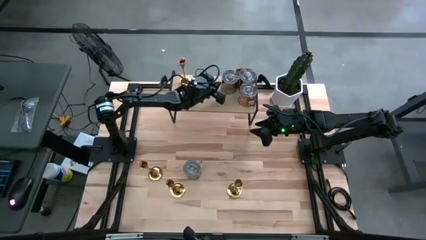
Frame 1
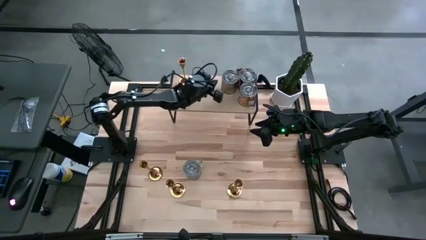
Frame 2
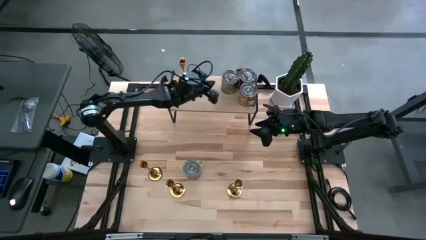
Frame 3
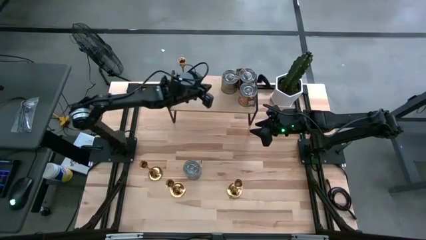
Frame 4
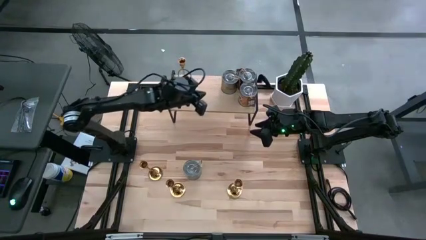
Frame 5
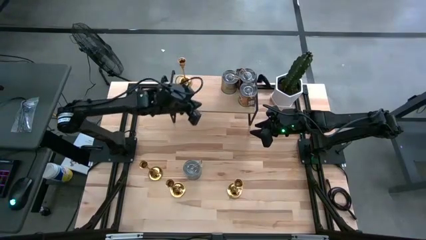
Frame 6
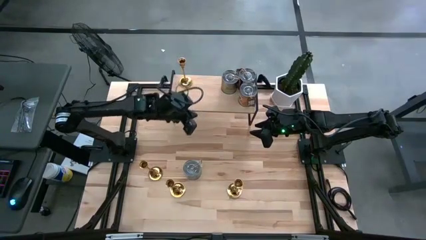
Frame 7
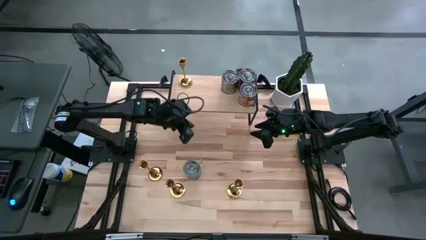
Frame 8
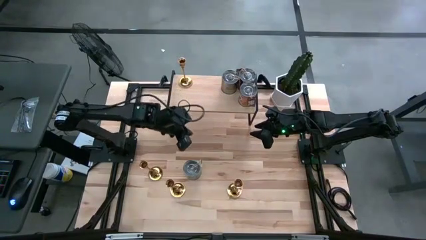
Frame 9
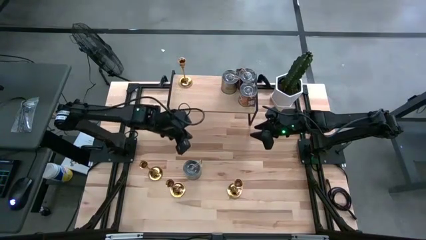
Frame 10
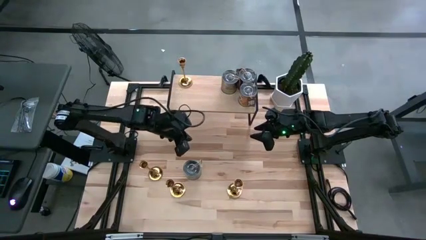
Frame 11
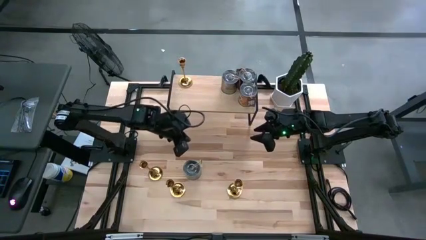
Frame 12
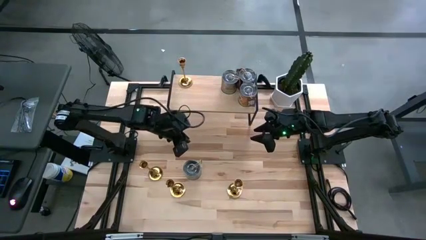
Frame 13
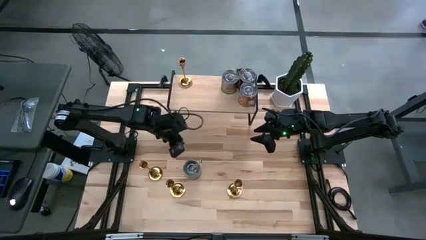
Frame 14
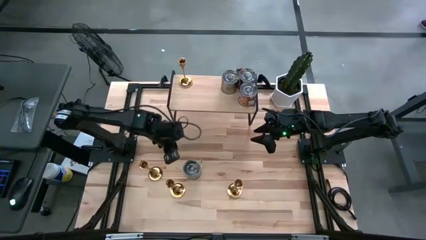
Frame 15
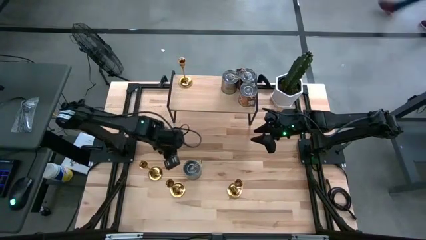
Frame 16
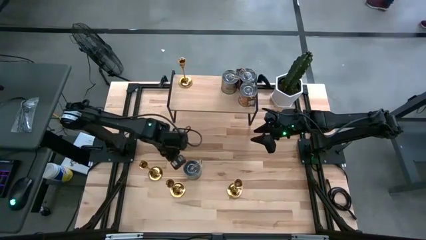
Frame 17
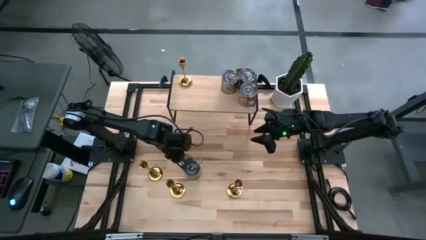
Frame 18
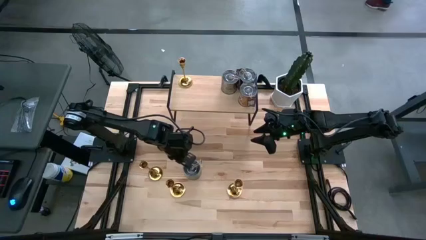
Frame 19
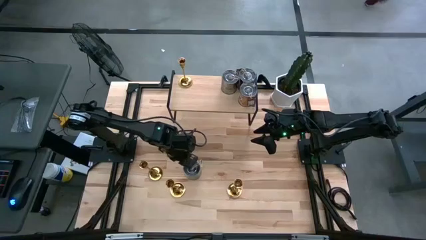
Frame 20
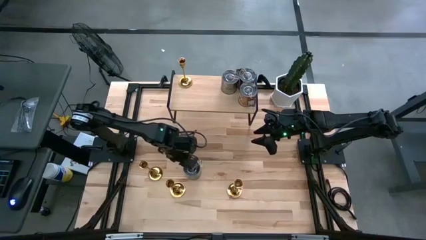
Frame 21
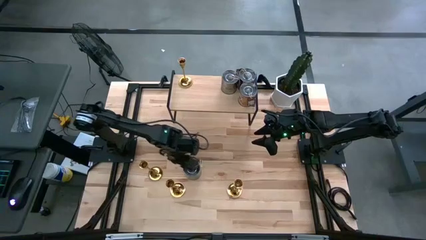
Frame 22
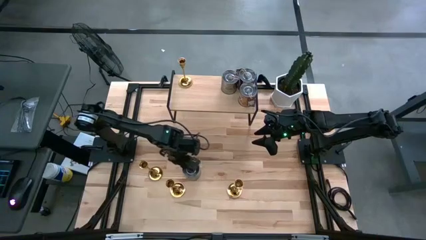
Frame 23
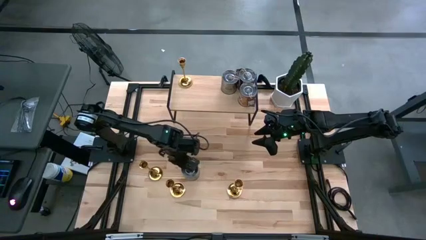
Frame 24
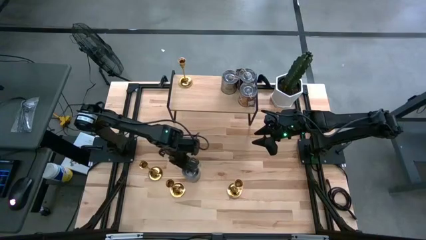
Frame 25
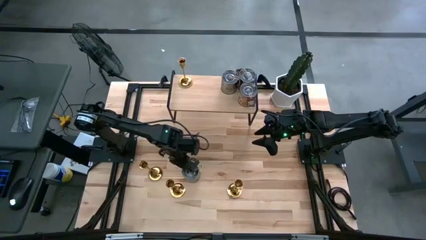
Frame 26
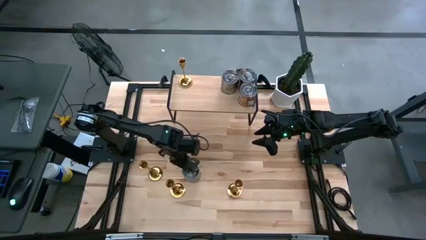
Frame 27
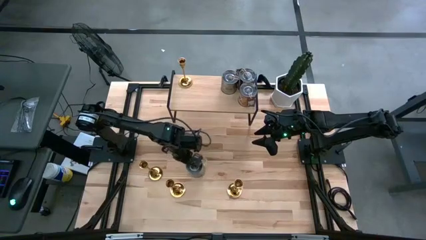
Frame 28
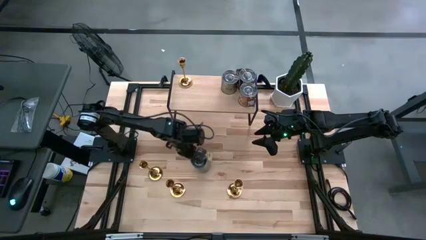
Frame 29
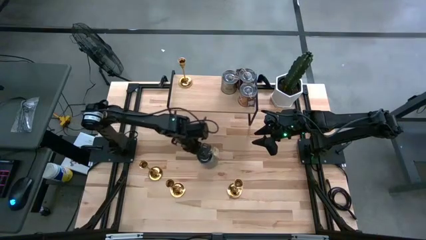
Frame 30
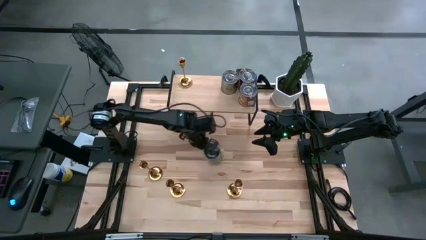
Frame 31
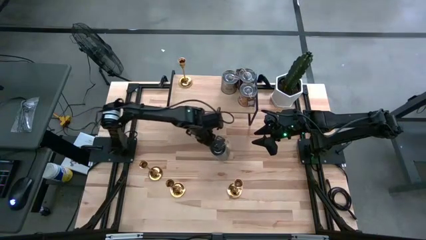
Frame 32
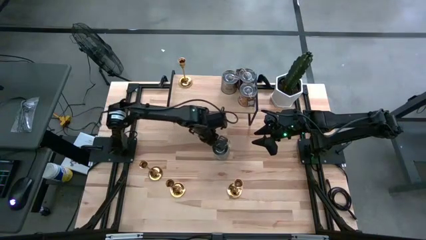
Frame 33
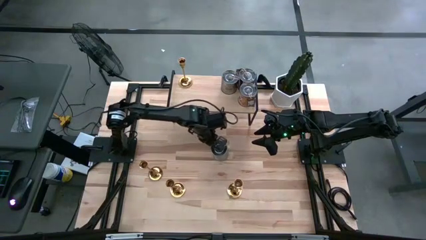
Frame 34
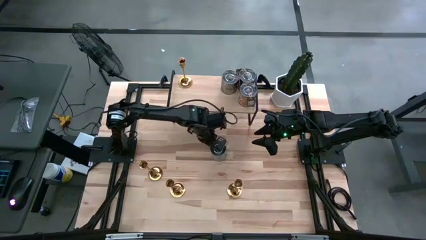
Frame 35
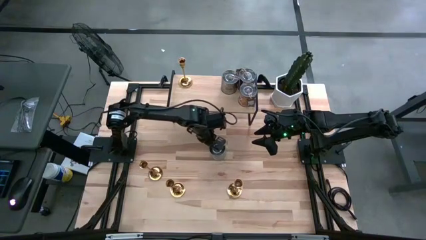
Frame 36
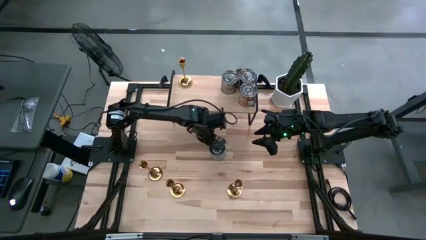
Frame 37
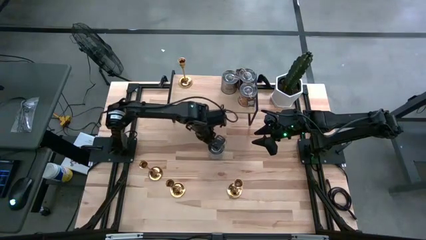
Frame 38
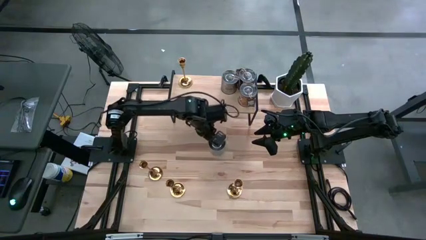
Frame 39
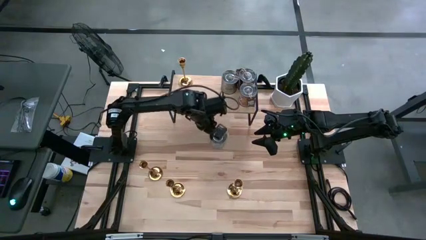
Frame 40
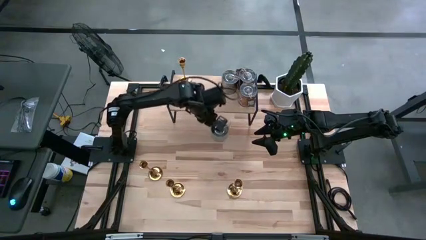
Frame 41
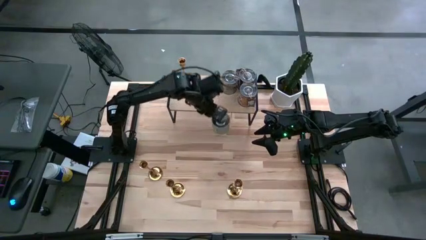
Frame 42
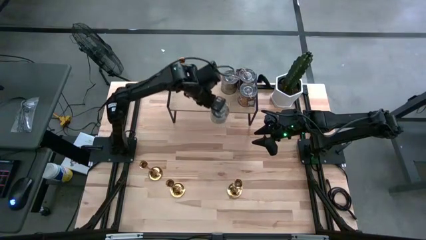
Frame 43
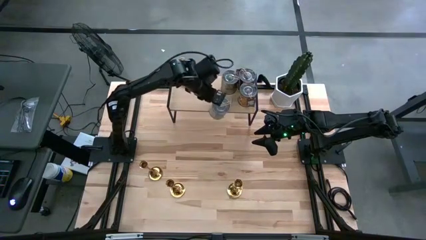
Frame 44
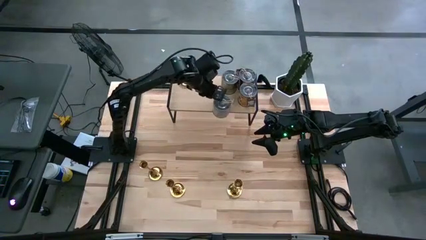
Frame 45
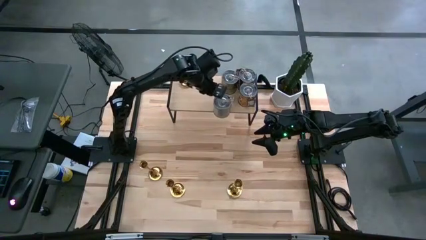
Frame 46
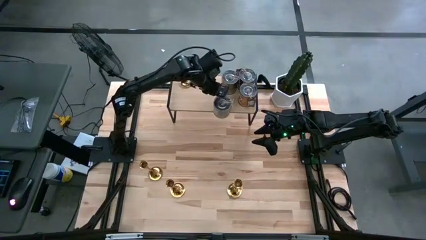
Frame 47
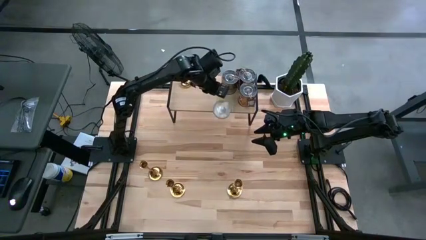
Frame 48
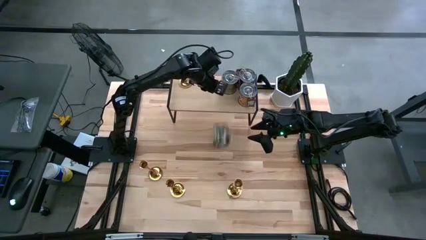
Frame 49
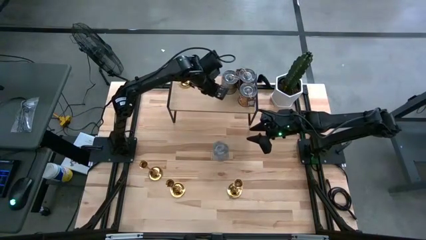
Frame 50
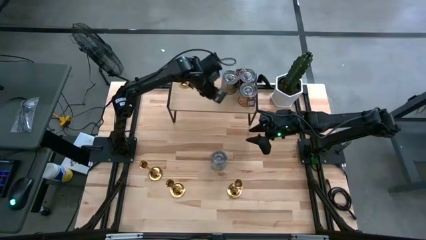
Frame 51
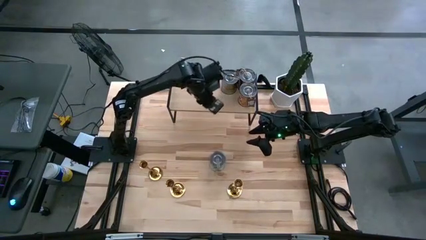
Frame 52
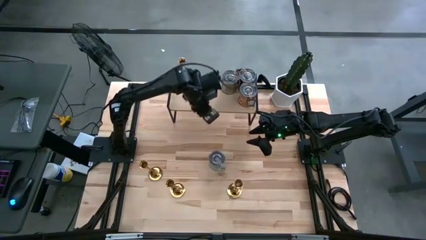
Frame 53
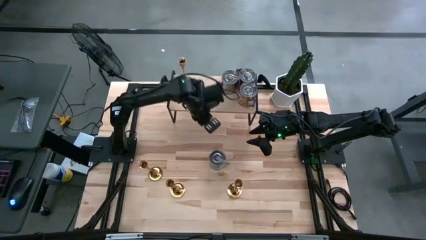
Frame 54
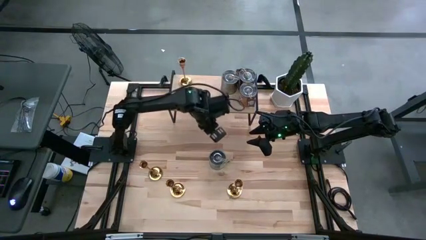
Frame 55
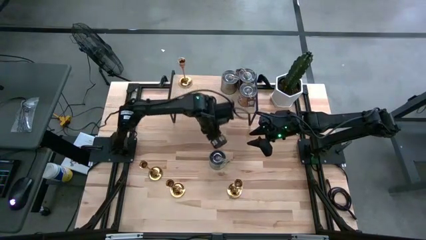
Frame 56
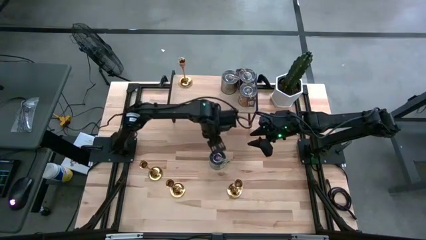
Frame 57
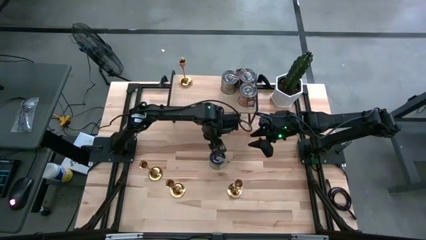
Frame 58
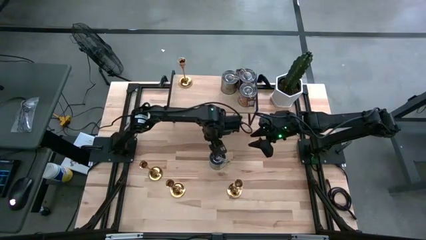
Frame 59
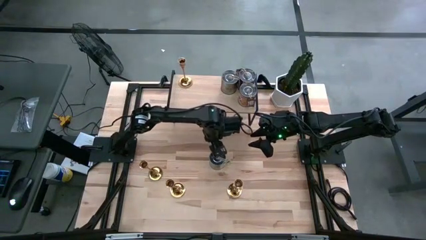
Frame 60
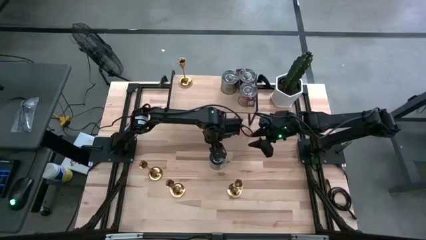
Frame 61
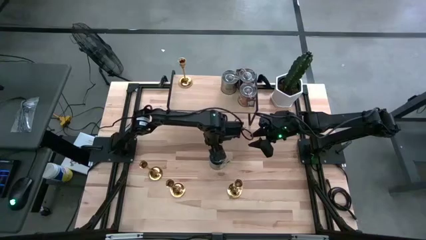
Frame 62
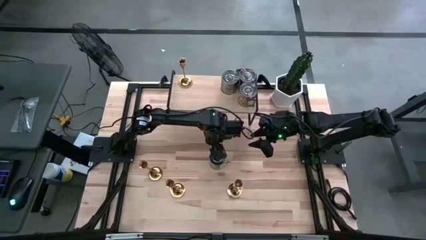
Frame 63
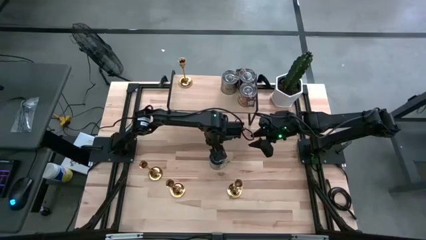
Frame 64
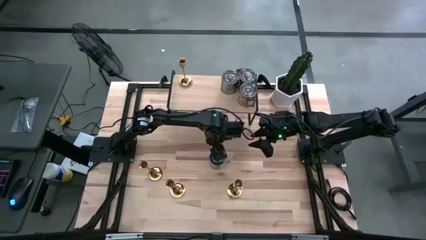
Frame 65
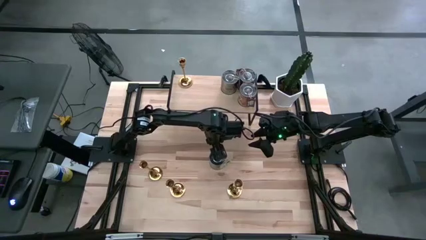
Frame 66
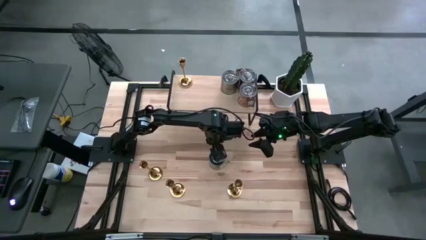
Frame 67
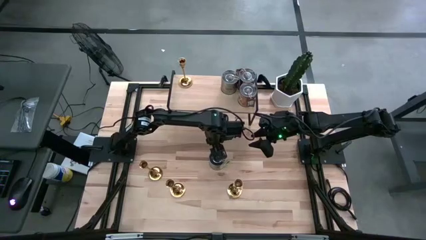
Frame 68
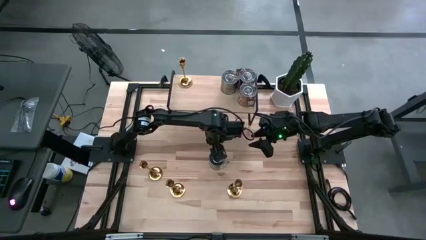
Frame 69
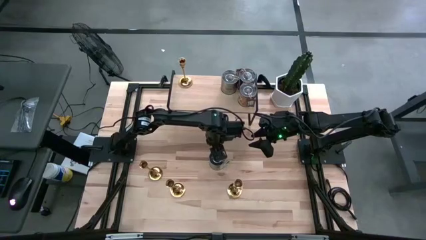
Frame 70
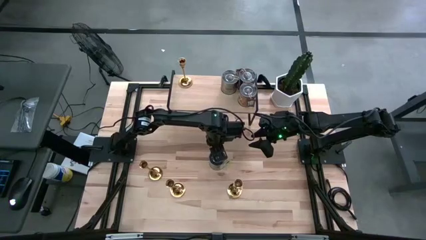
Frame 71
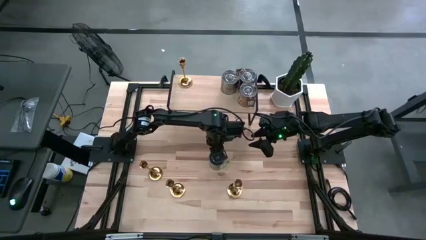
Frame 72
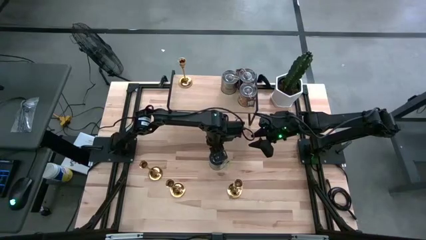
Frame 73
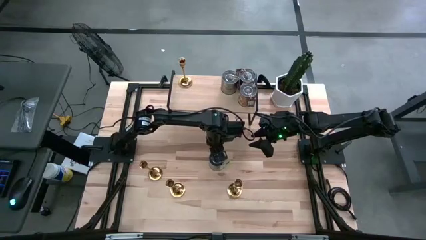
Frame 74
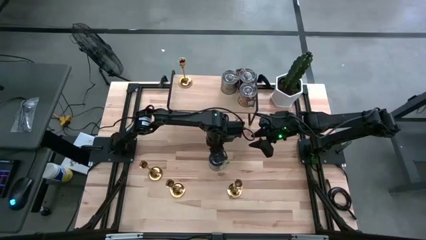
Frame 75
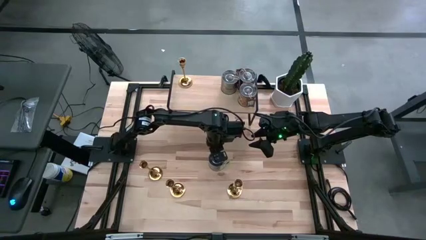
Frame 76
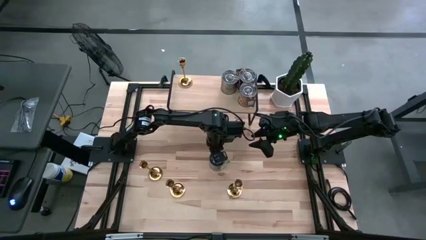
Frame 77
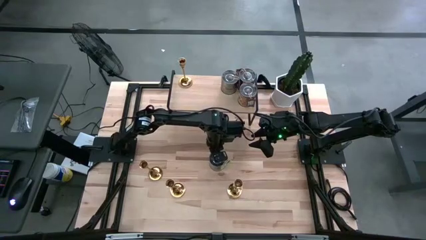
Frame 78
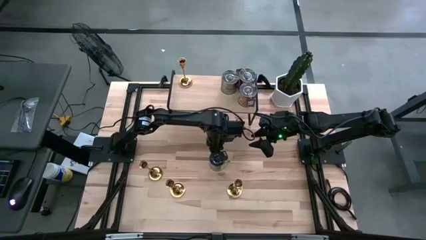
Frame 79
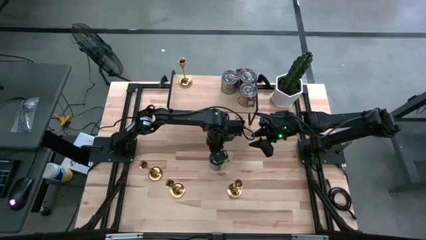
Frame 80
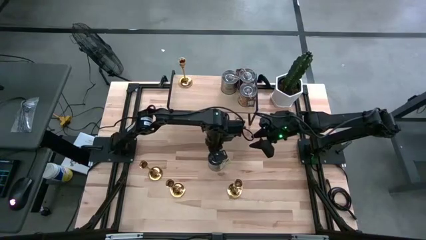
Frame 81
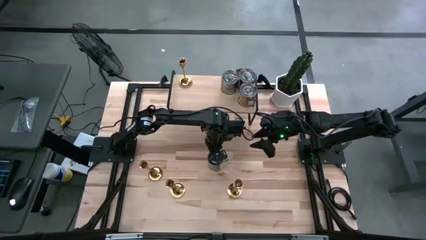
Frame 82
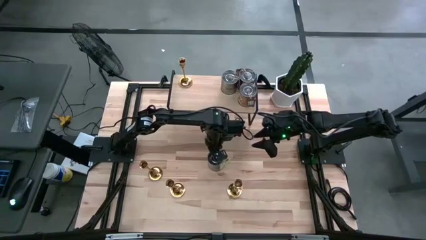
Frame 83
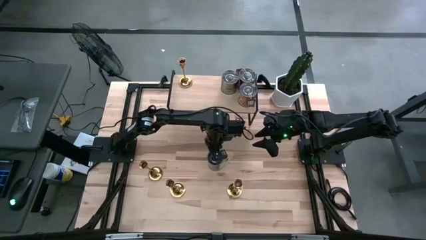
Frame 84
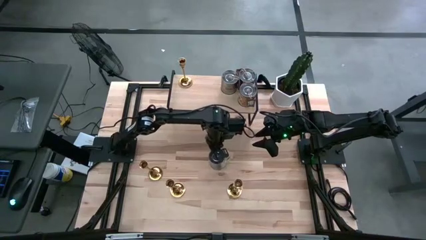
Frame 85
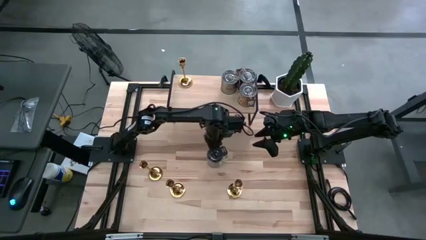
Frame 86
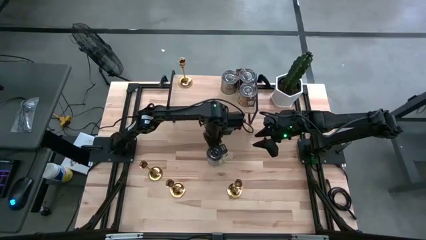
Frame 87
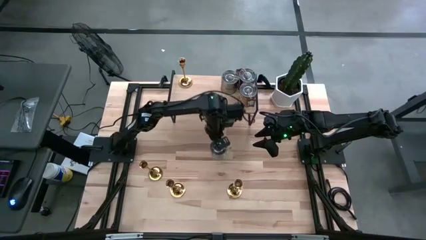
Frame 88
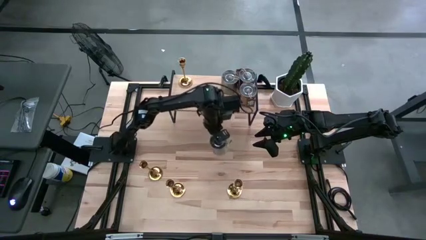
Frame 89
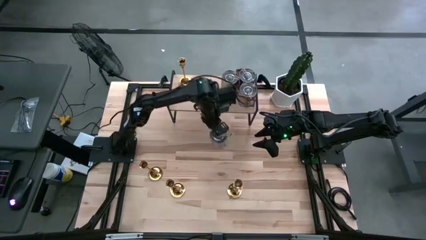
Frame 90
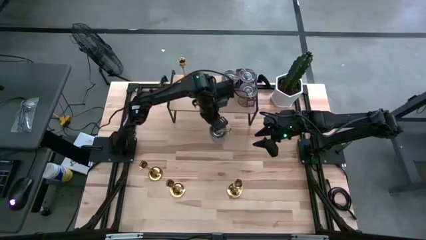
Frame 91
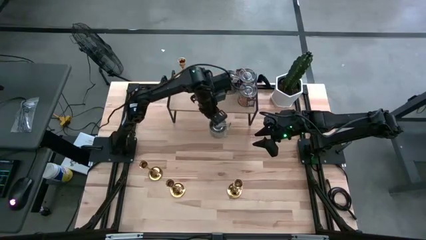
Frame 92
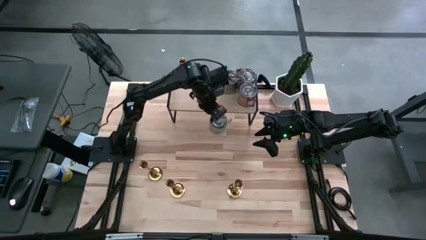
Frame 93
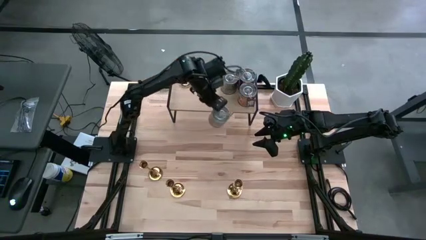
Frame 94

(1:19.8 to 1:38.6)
Task: Pick & Place candle stick holders
Put the silver scented candle on the shelf
